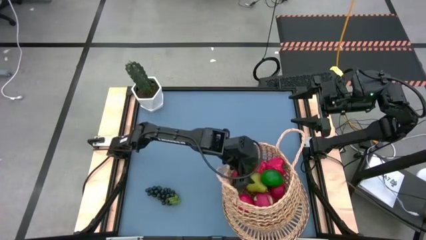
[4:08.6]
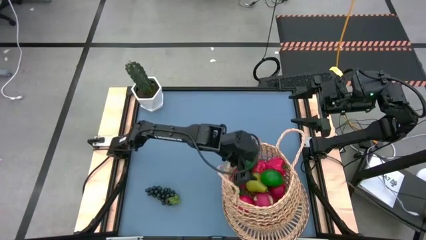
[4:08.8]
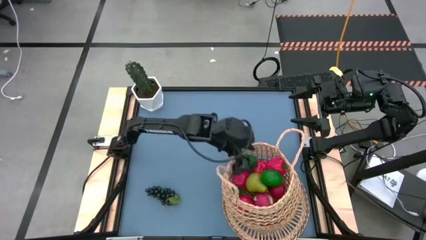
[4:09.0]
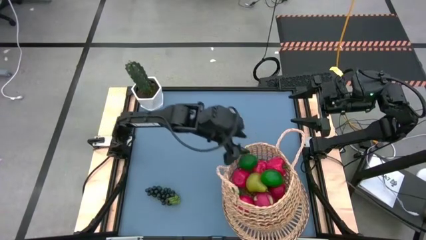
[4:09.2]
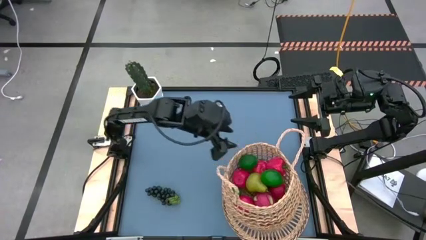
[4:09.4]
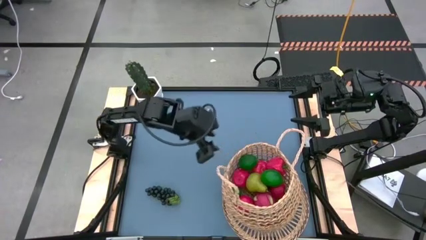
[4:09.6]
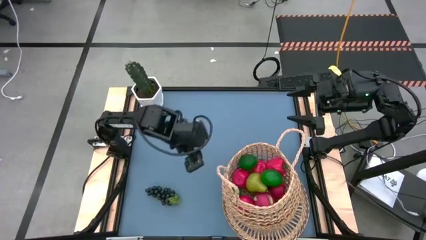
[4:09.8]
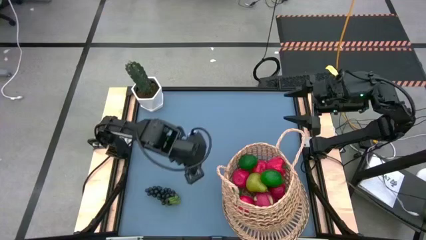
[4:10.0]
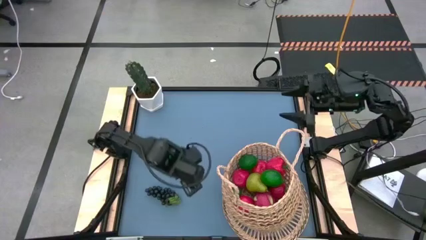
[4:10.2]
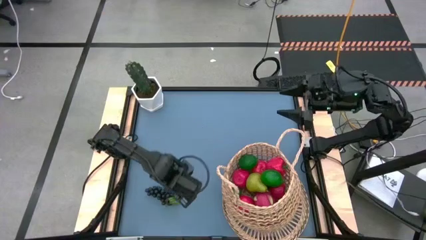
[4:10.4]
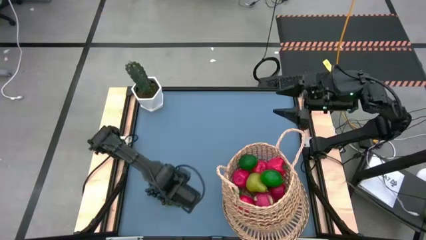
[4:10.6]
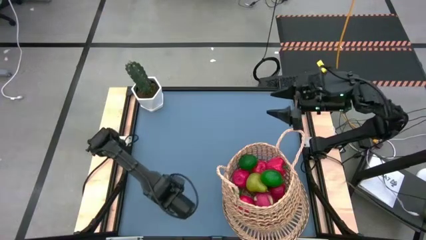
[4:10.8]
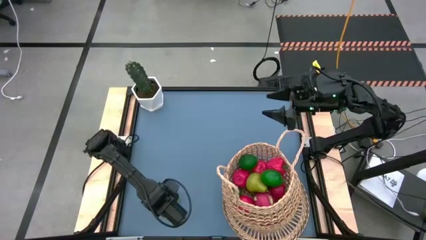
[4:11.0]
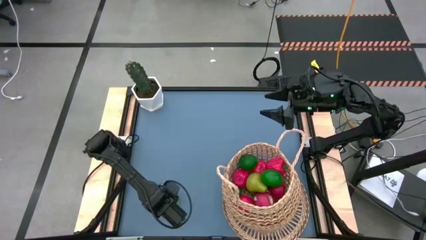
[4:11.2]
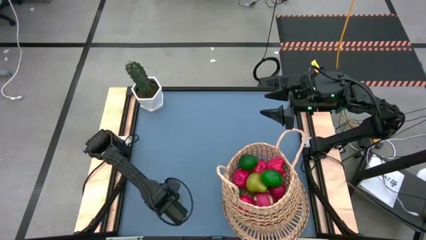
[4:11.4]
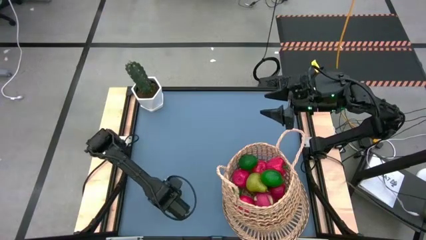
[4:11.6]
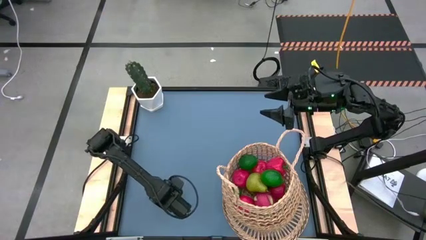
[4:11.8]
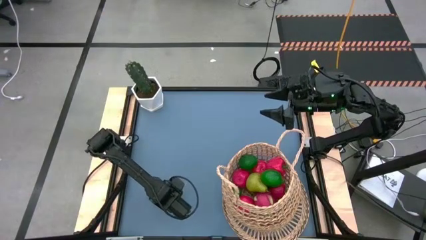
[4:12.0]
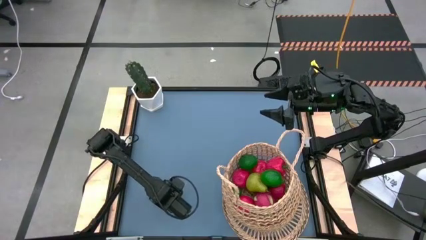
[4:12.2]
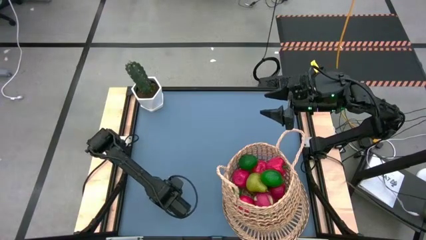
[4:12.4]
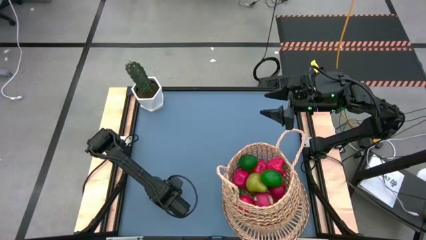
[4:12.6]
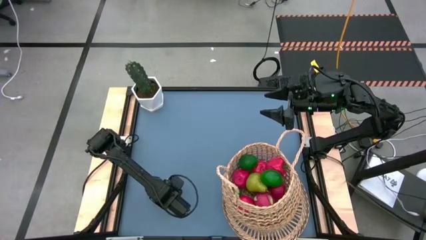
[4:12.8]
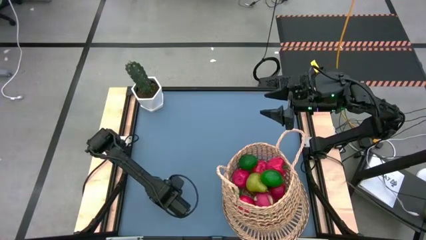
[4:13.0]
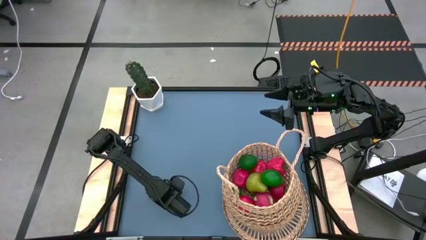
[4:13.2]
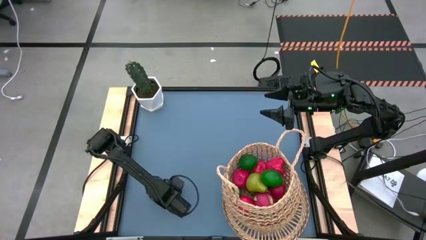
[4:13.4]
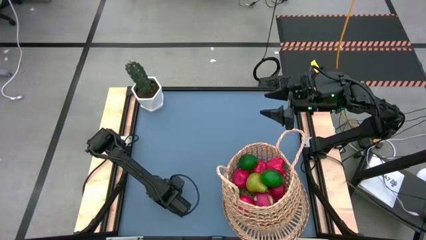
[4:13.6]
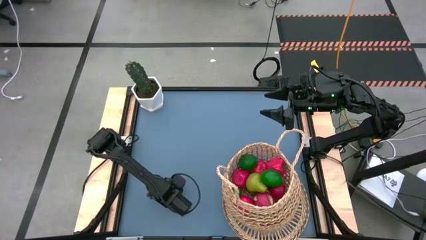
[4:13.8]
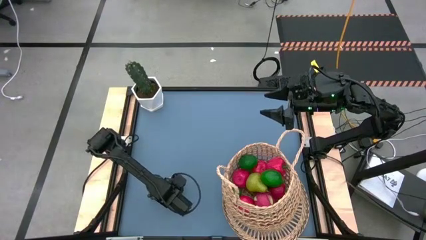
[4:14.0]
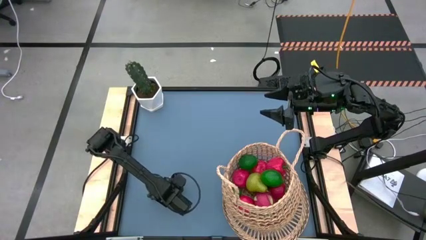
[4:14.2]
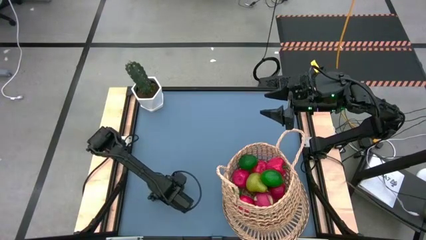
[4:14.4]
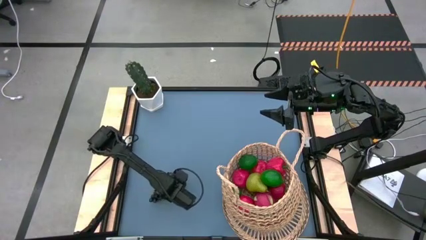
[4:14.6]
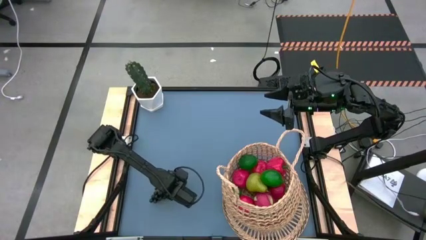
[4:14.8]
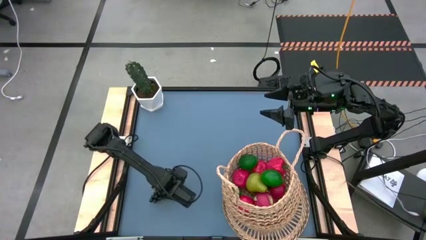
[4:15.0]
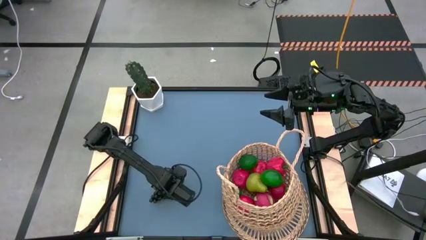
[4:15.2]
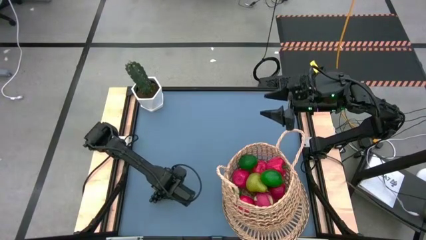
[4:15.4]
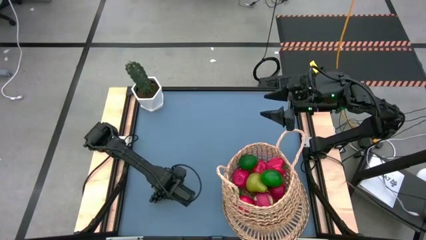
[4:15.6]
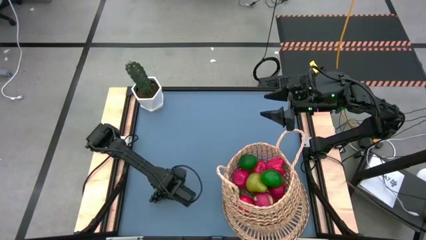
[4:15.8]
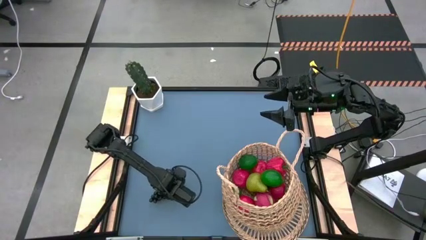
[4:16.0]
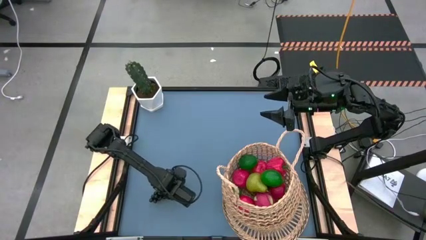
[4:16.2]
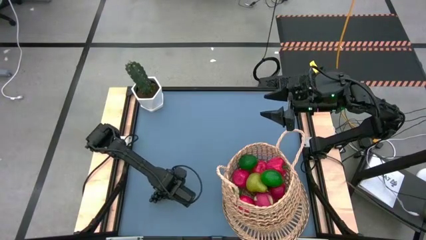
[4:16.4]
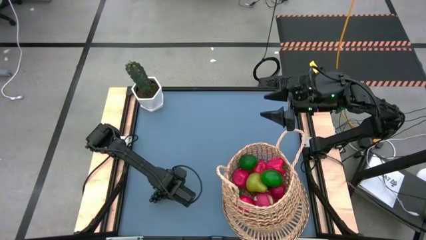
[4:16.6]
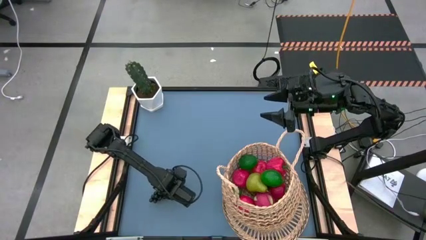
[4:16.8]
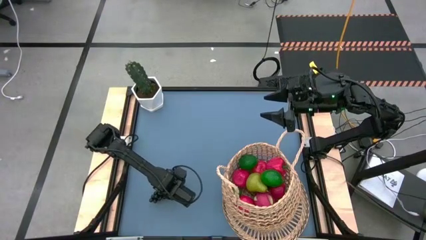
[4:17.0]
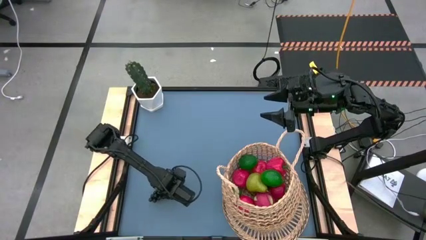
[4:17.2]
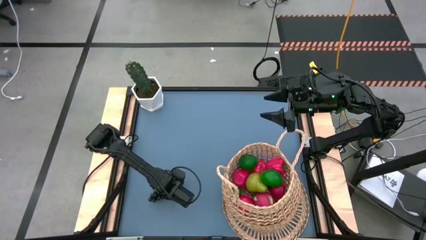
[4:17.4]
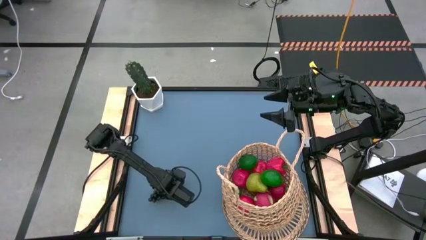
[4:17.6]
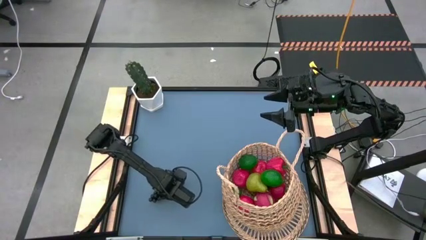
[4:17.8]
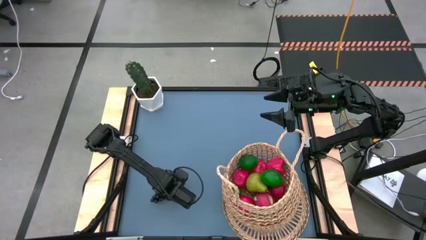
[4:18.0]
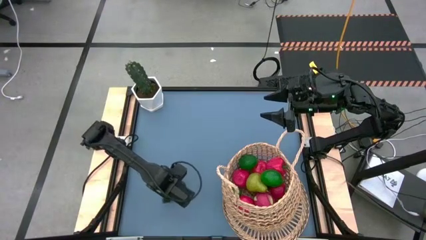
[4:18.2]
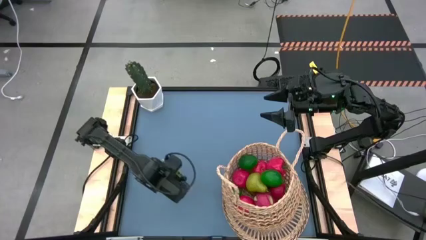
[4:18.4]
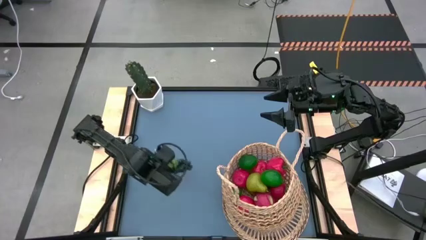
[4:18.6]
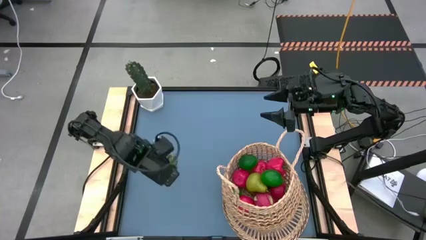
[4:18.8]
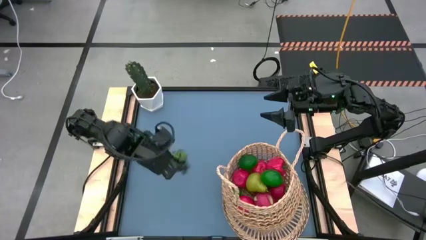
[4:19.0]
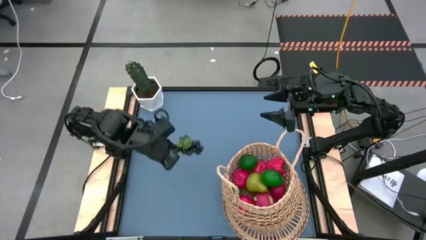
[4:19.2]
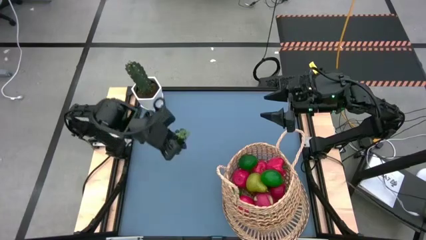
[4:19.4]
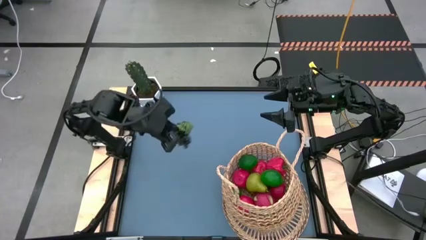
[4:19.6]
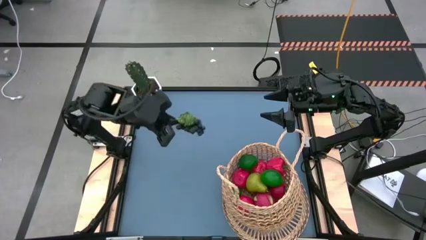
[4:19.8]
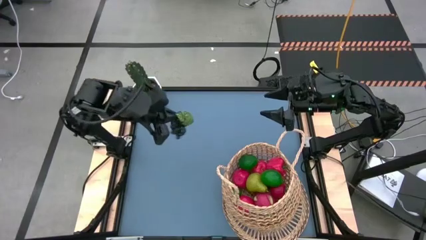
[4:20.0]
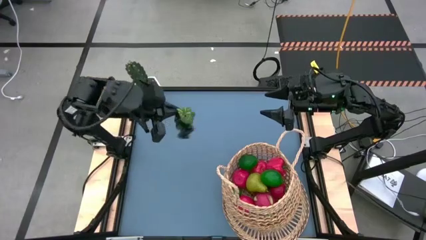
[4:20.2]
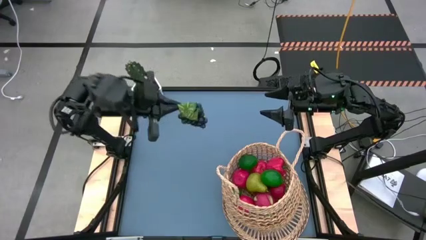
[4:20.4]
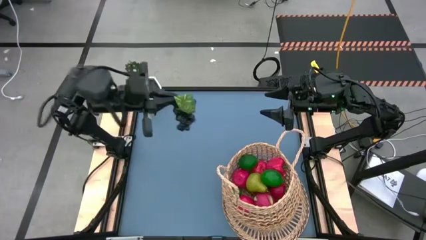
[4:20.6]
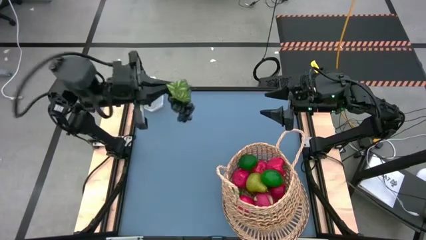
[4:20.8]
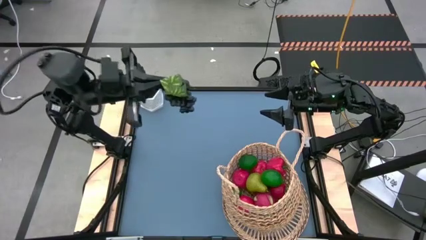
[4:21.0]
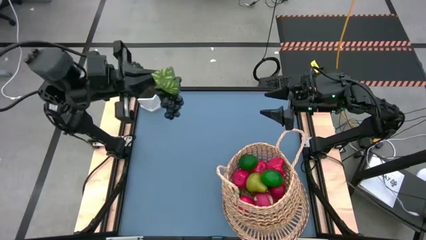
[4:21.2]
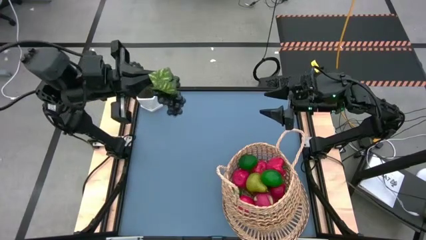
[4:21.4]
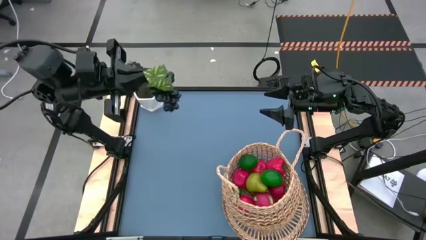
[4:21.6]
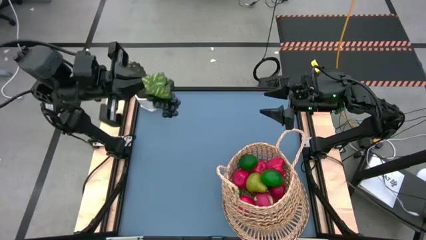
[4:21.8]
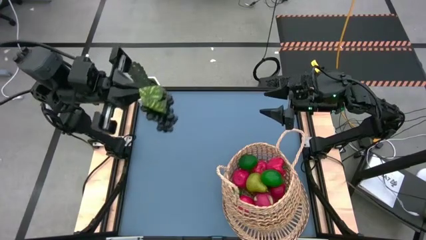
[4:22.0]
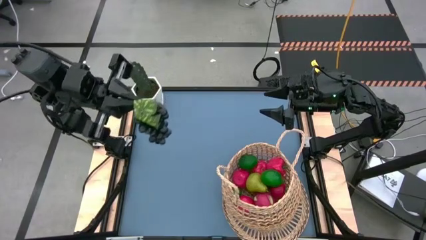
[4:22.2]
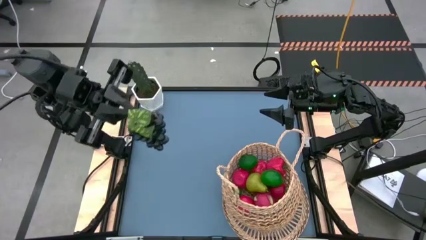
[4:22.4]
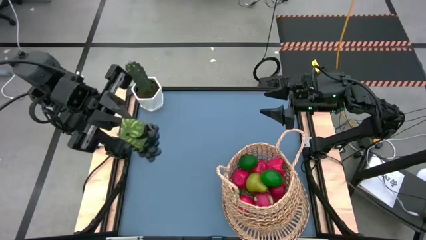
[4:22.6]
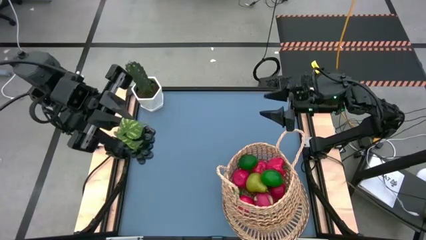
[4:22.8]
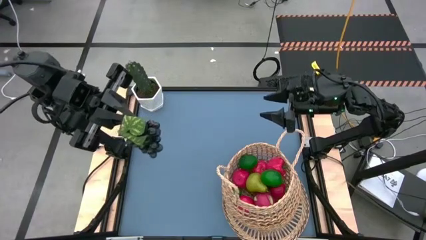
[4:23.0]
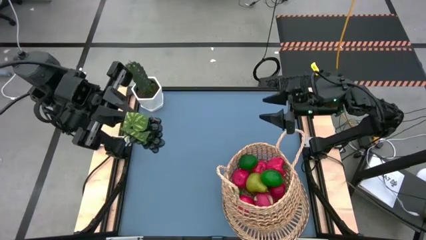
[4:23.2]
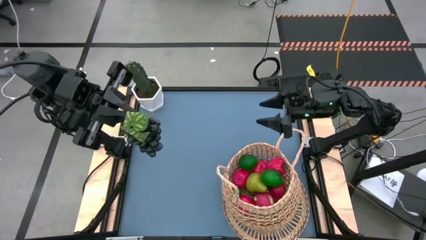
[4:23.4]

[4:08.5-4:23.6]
Task: Build produce basket
Put the purple grapes into the brown basket

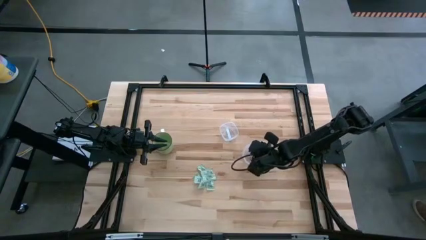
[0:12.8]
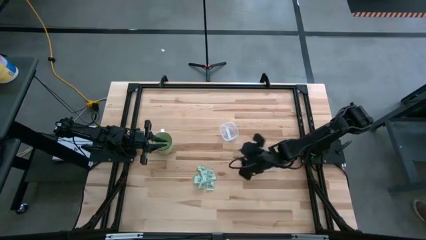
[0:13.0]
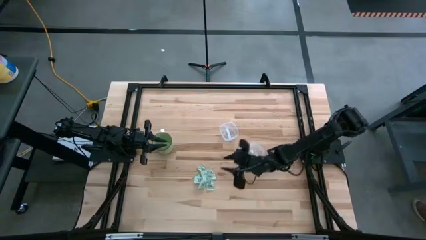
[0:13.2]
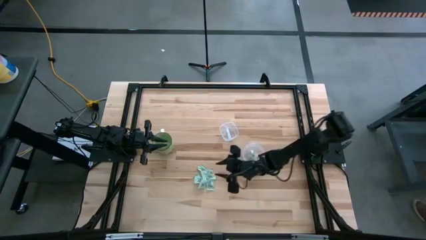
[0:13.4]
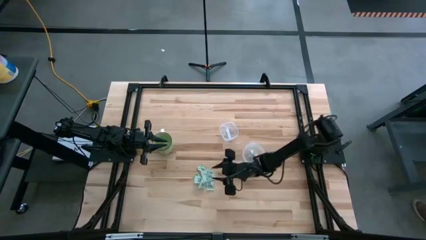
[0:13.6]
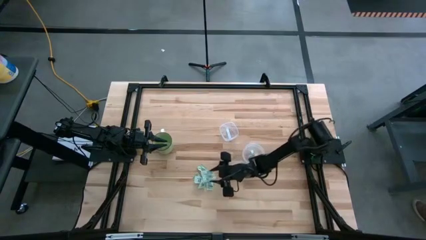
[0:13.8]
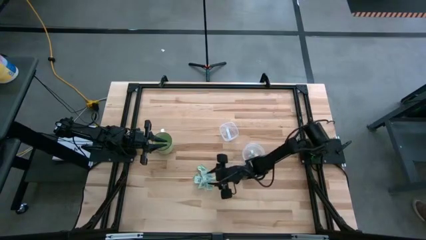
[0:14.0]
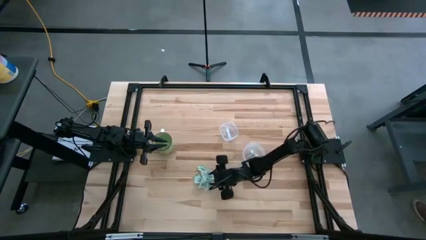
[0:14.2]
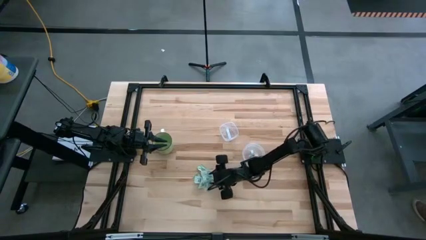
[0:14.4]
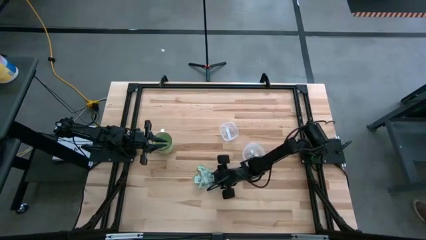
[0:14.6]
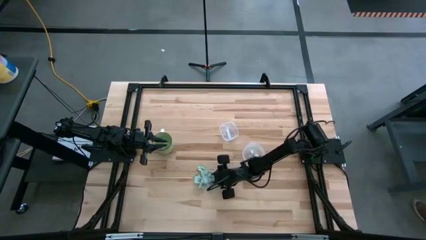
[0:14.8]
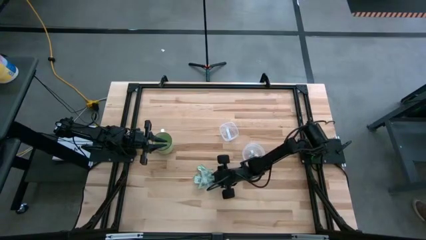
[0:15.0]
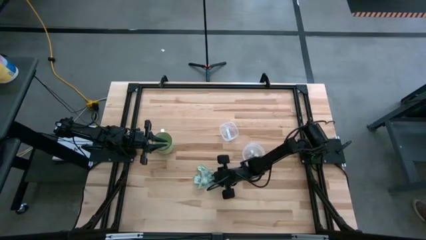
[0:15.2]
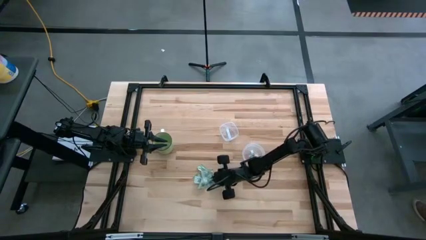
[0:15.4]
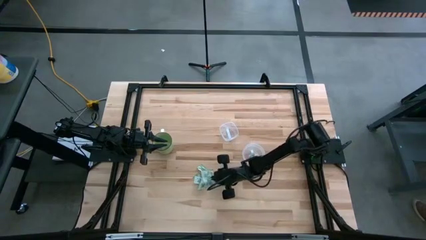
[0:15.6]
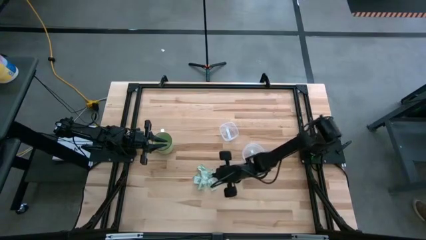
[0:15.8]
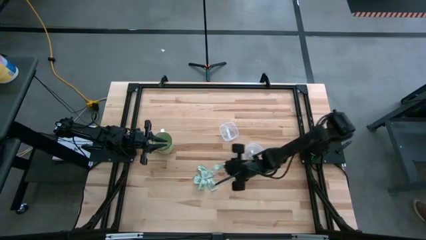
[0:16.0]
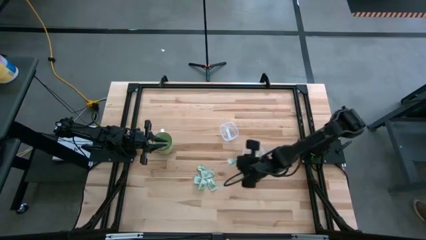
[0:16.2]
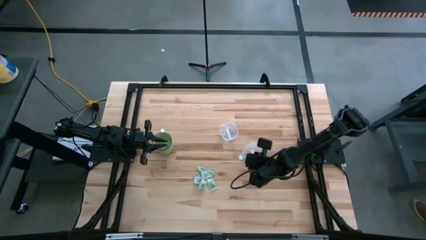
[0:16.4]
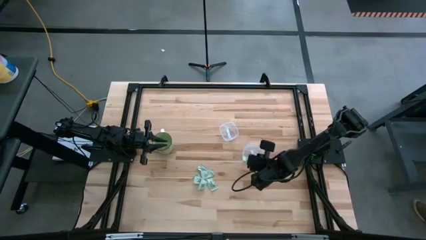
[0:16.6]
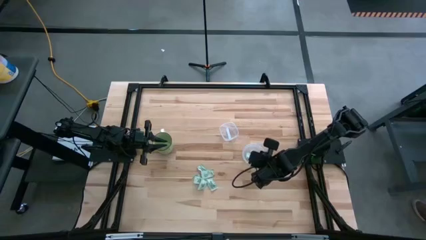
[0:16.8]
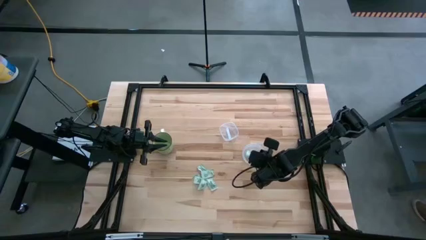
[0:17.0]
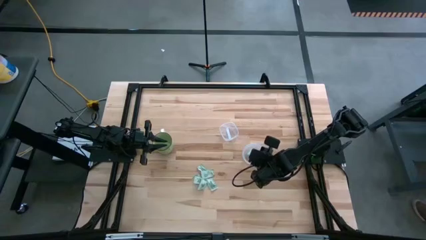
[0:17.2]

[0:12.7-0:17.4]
Task: Pick and place Stevia / Truvia into bins
Put the stevia packet into the bottom transparent container
